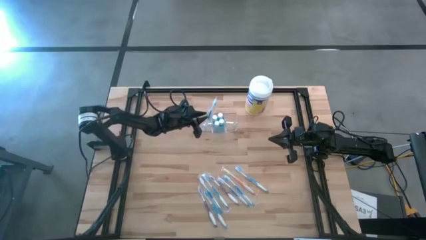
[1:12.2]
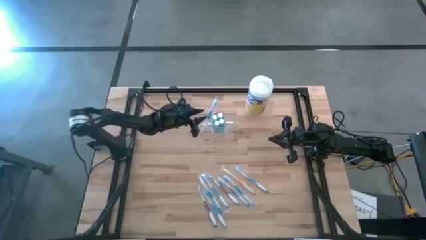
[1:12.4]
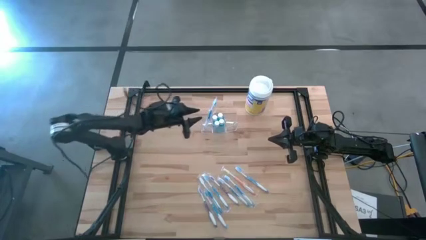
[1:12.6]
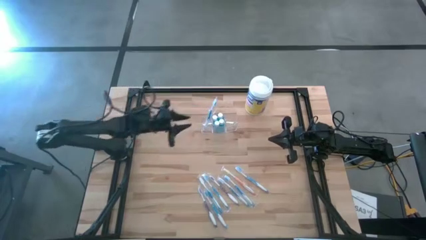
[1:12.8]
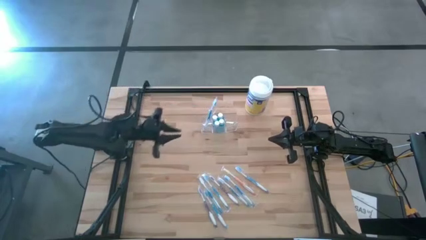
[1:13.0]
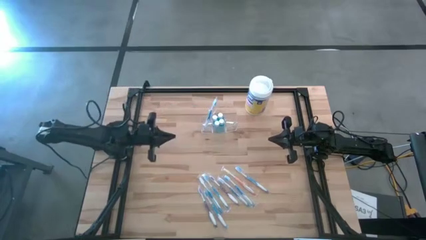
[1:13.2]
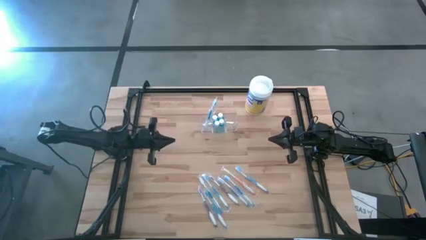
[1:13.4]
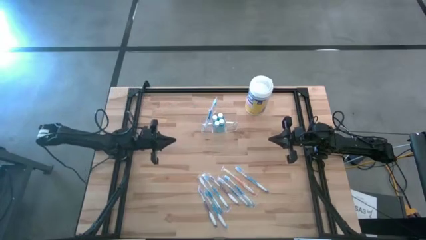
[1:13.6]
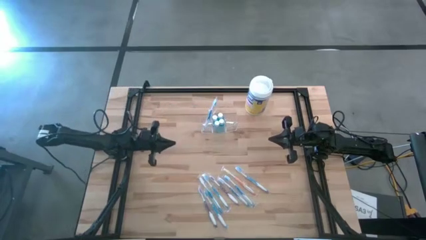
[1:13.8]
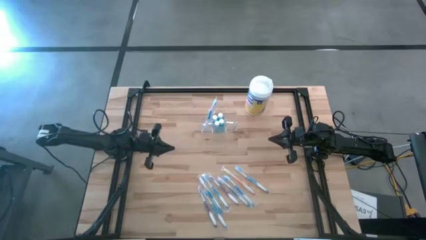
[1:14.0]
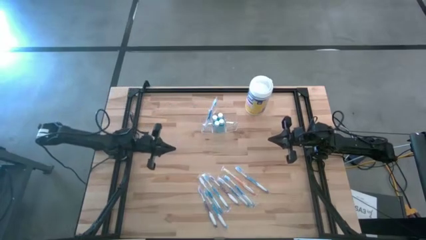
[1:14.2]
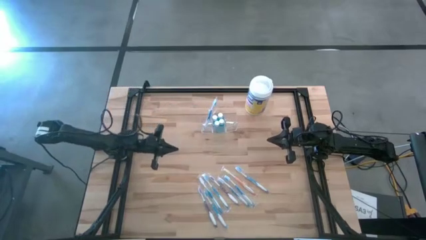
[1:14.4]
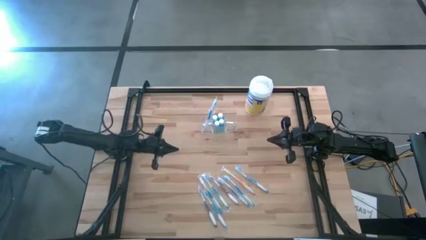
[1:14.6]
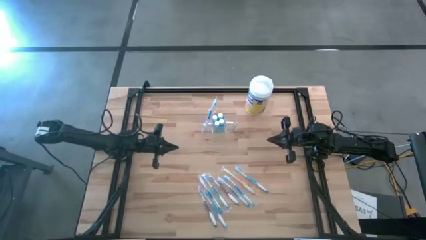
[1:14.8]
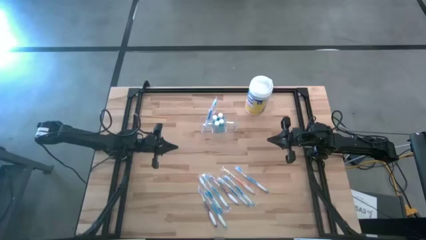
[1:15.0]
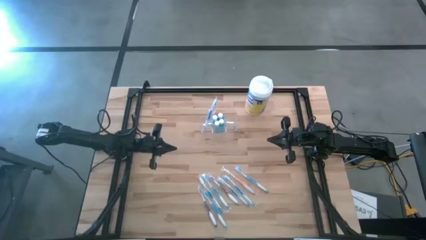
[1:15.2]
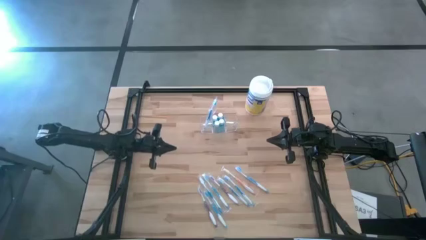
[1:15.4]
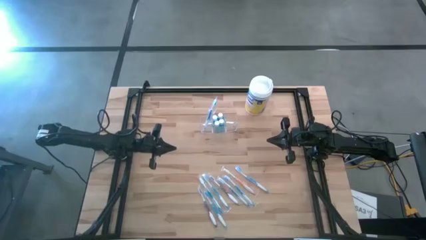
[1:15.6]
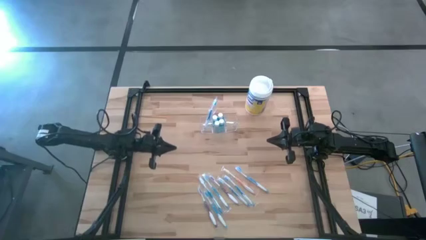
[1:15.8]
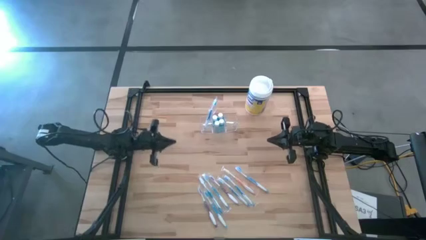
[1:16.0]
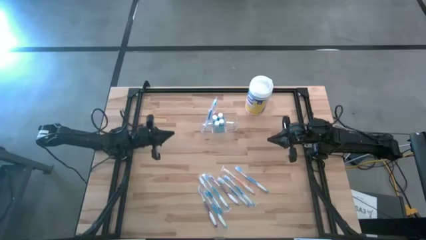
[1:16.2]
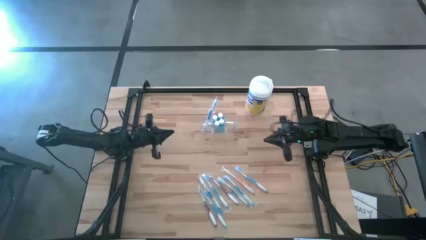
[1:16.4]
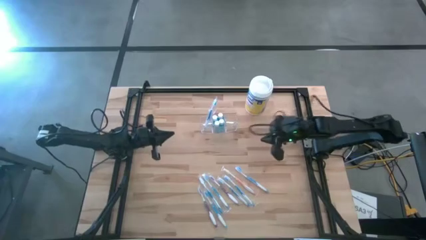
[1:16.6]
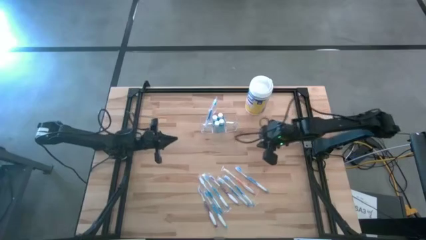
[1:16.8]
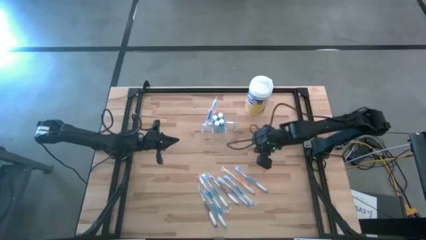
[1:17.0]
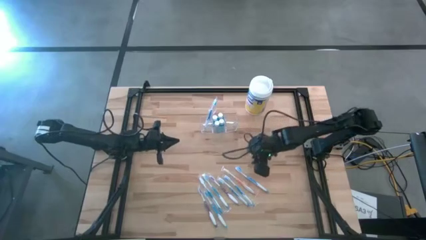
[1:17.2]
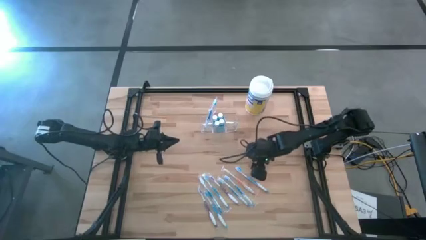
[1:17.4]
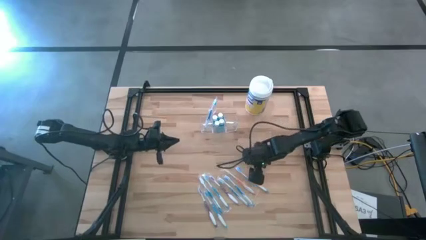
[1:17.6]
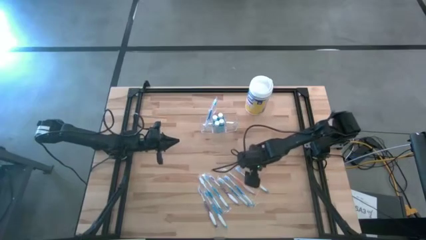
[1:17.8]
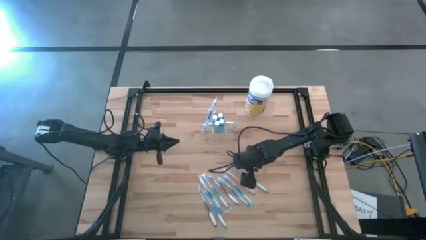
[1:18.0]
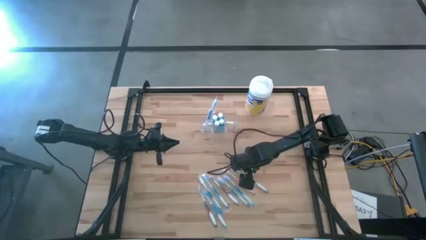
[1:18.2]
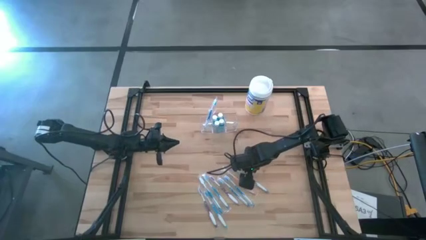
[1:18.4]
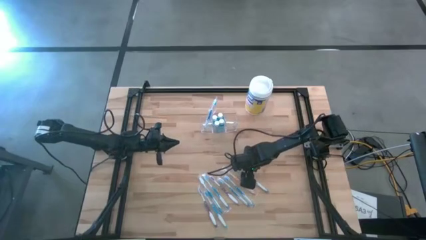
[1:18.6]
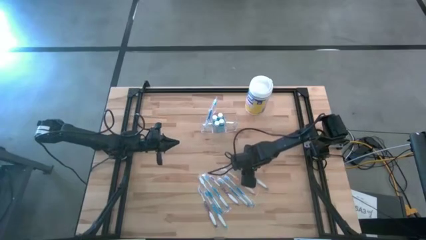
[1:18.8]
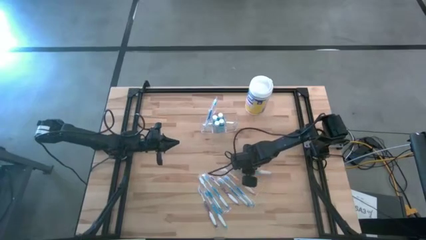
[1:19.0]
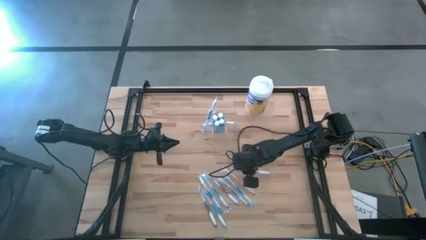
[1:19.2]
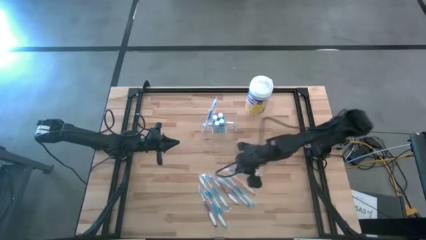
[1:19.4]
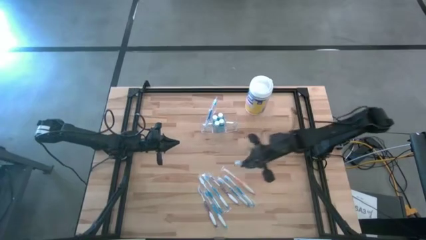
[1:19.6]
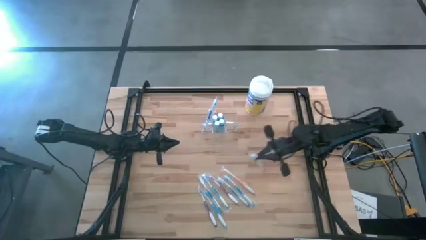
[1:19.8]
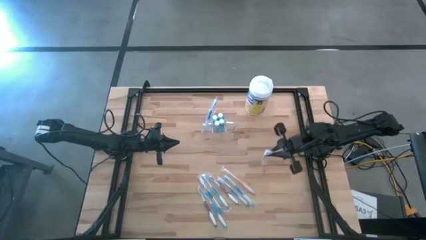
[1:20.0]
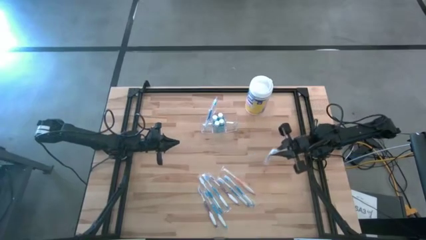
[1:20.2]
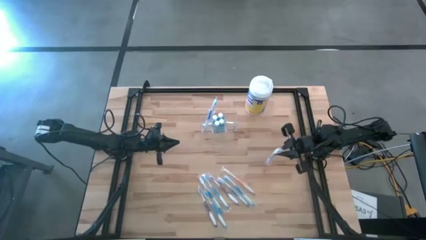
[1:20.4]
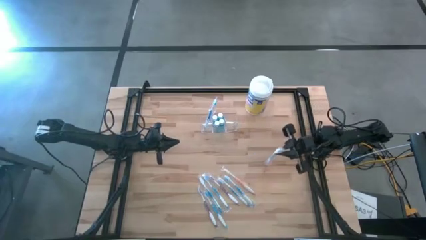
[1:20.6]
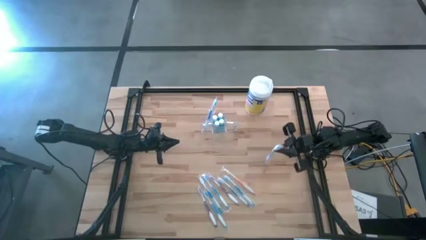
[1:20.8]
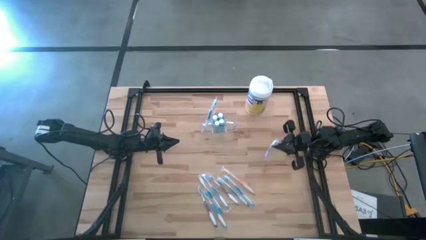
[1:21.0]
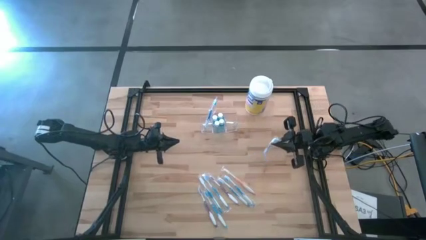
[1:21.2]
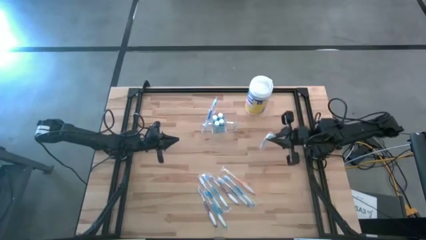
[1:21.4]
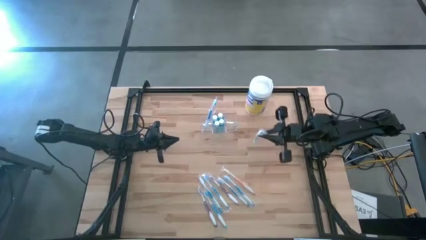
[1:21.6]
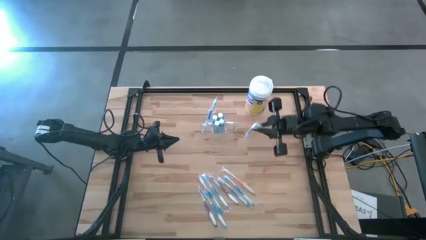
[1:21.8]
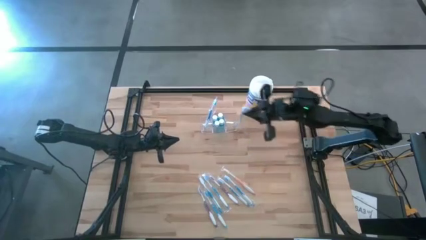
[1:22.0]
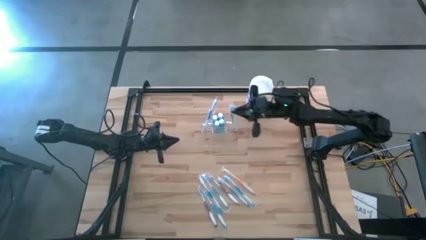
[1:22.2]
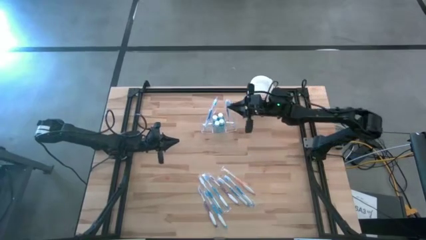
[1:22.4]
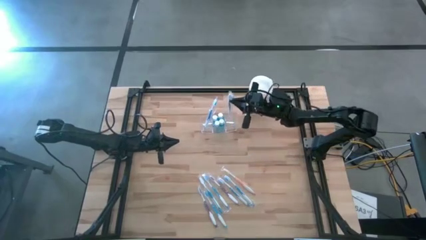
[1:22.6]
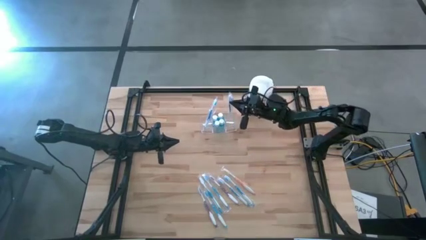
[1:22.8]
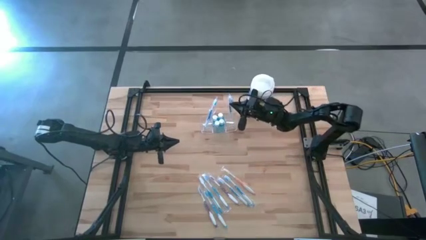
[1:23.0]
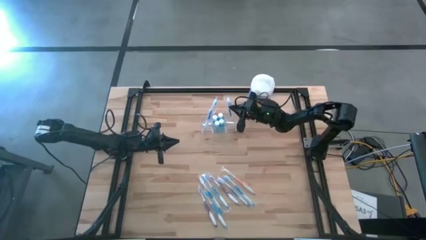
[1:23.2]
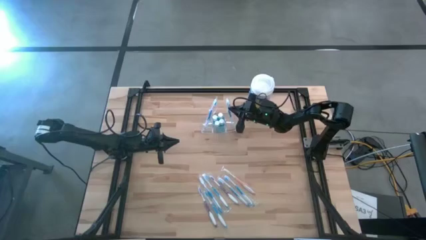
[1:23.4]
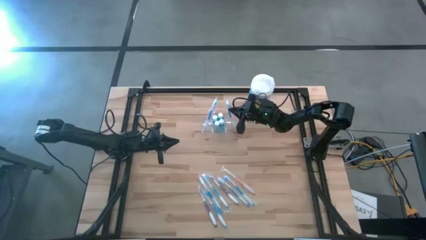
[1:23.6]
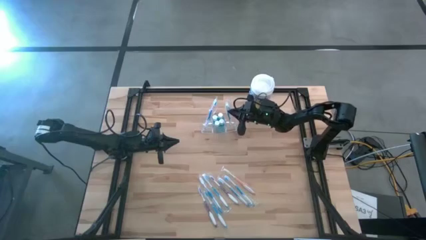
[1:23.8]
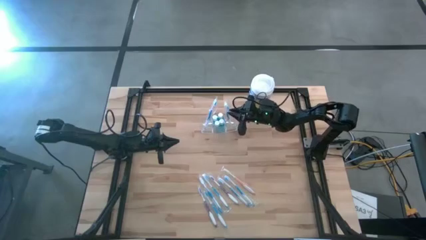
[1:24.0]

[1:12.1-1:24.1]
Task: Pick & Place toothbrushing station
Put the blue toothbrush into the transparent organizer

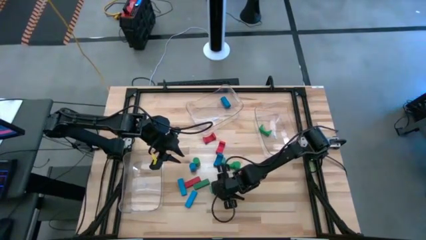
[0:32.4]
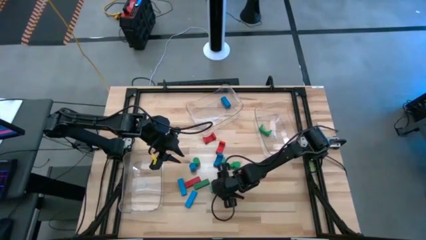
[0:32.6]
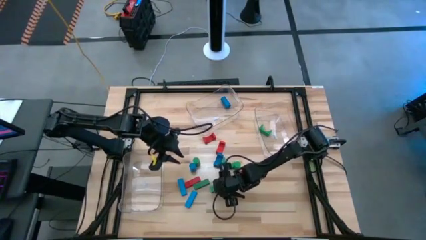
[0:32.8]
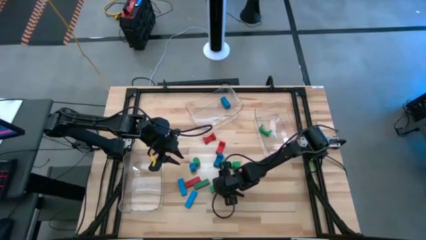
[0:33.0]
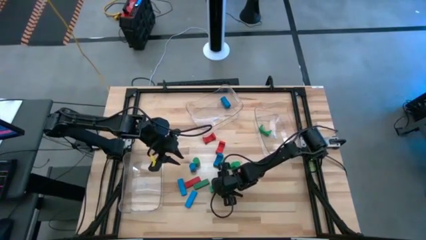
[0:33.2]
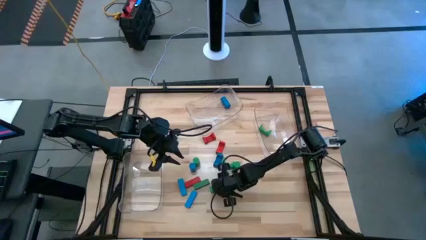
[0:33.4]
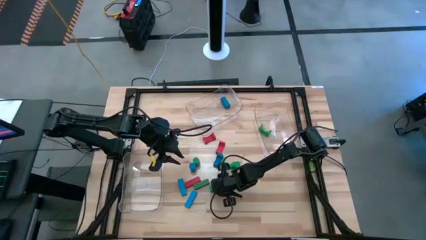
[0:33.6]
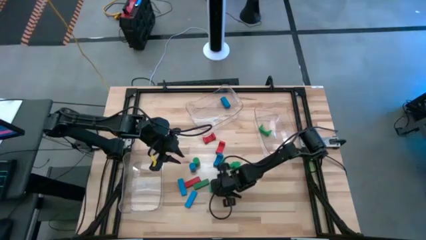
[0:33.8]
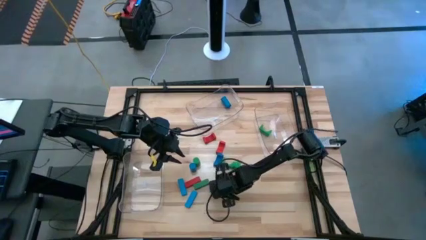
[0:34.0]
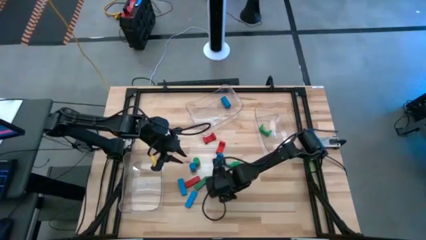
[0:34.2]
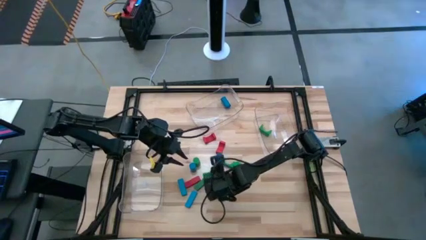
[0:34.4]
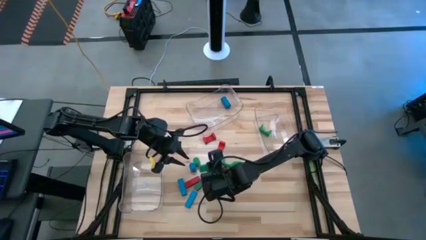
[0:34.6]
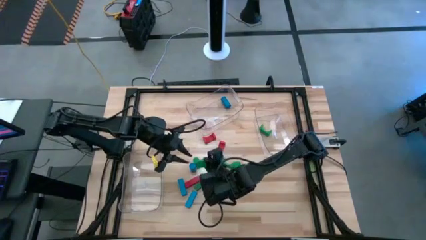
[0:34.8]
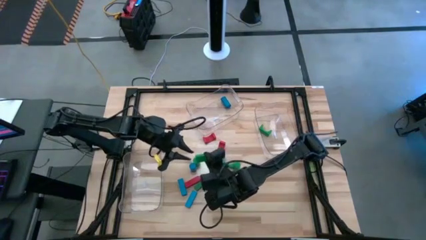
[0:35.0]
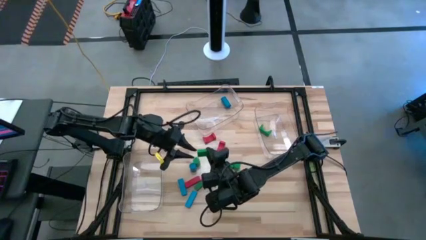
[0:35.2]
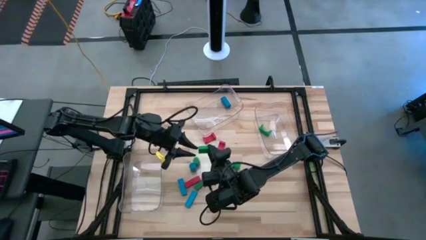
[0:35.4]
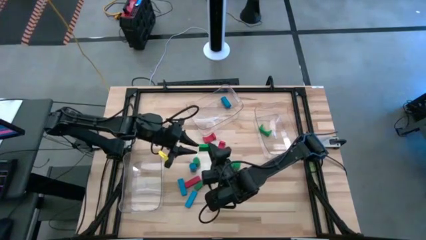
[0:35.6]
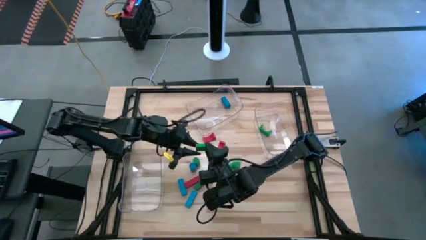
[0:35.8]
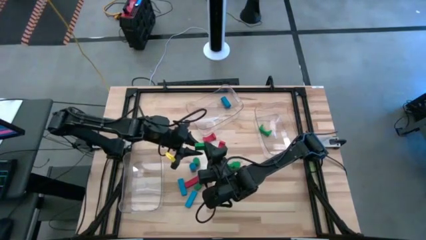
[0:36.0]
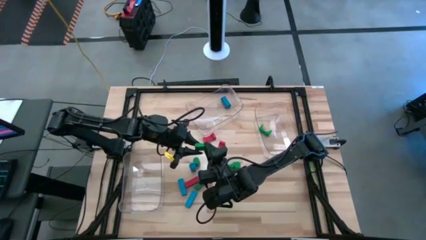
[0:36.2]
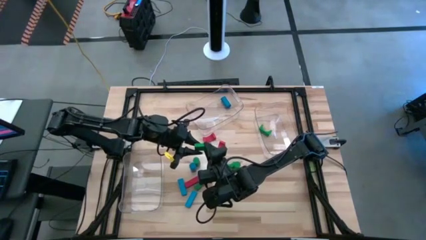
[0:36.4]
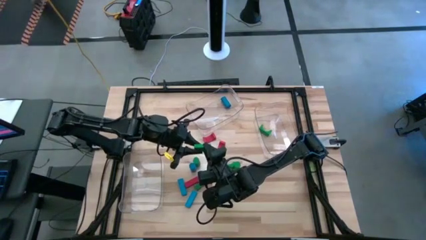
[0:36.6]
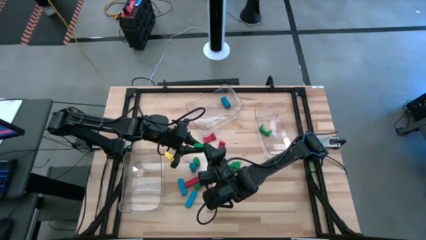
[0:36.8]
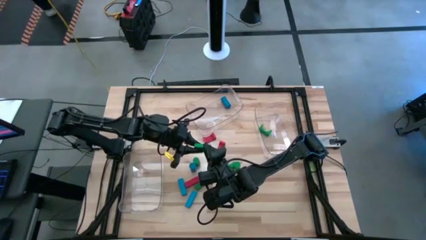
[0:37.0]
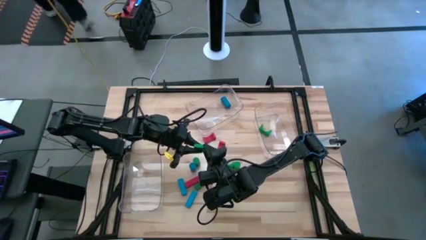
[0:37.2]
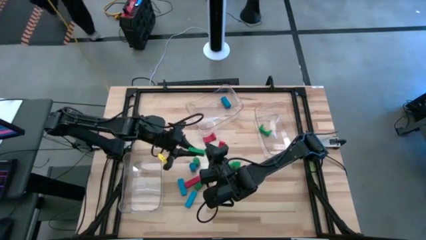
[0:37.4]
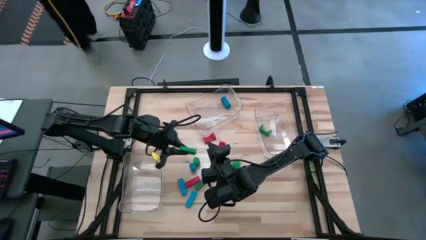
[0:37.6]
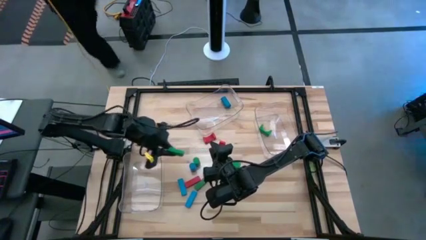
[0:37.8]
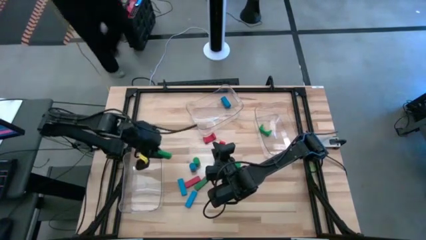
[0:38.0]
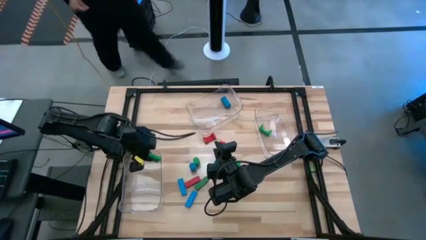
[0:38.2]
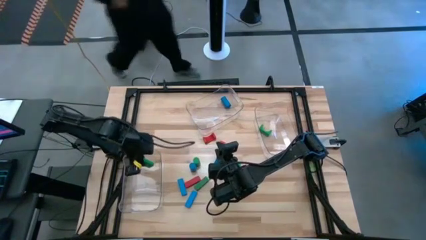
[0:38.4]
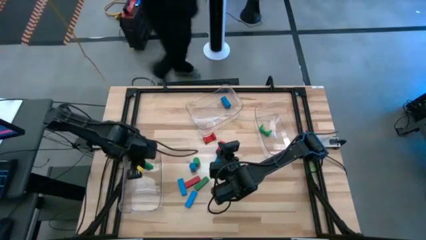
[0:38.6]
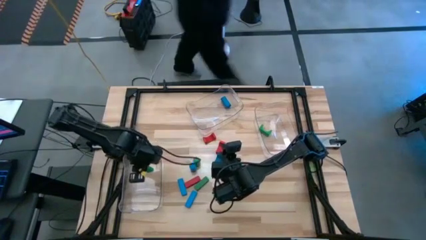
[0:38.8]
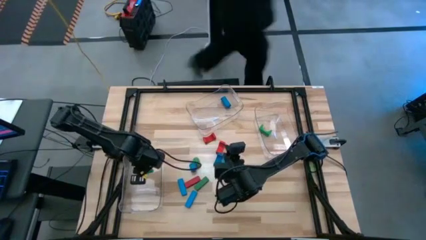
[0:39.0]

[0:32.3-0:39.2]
Task: Sort blocks by size
Put the bottom green rectangle block into the left transparent bin
